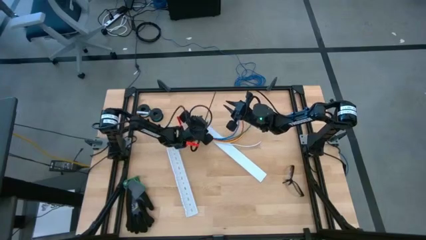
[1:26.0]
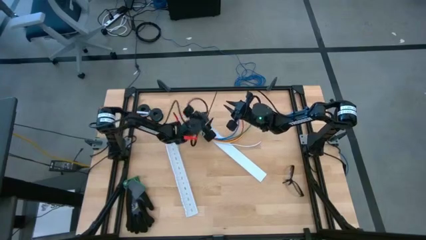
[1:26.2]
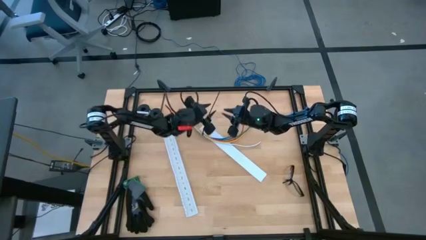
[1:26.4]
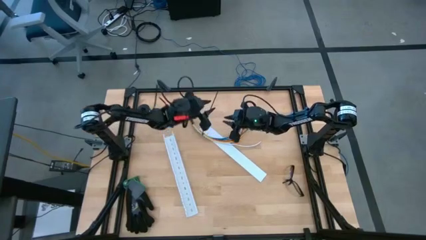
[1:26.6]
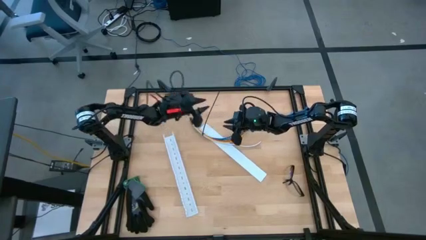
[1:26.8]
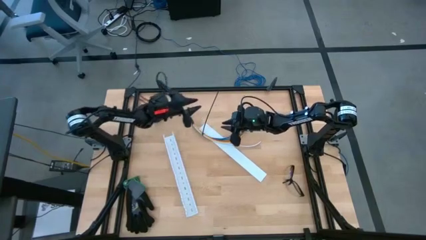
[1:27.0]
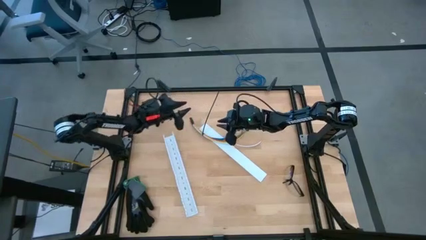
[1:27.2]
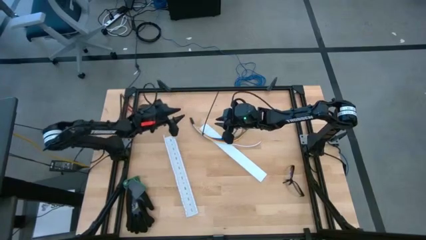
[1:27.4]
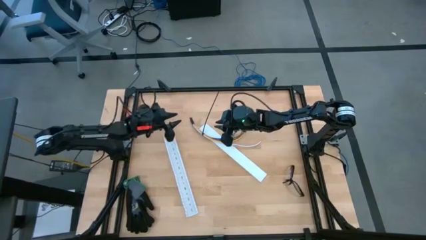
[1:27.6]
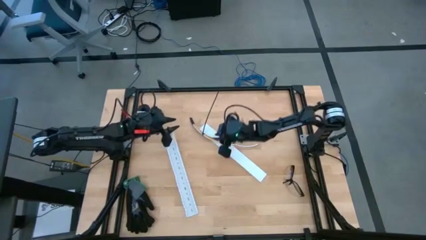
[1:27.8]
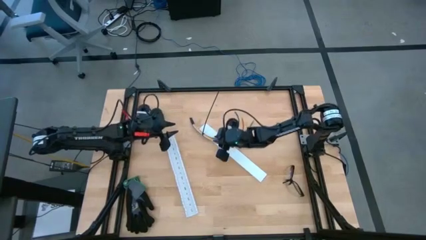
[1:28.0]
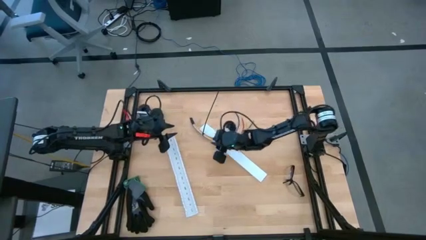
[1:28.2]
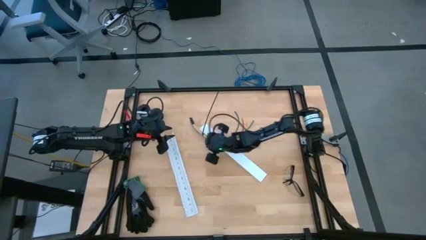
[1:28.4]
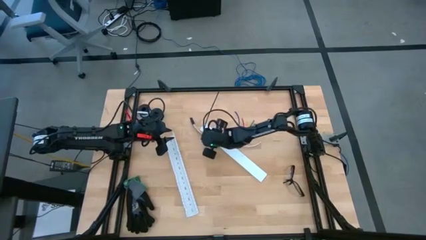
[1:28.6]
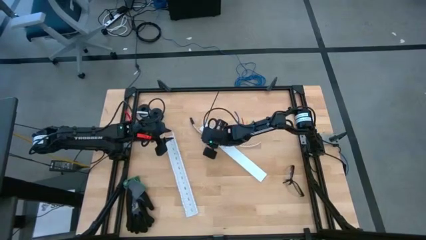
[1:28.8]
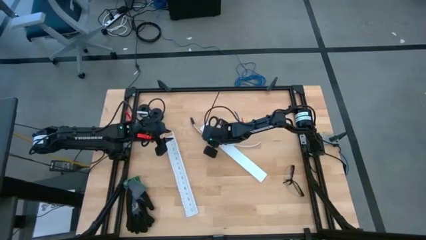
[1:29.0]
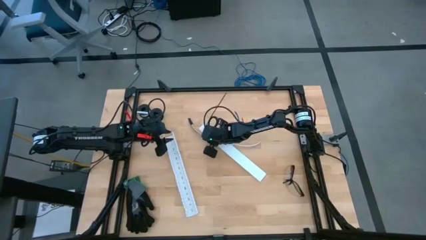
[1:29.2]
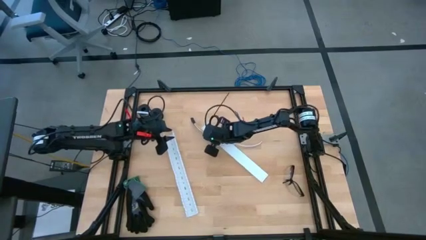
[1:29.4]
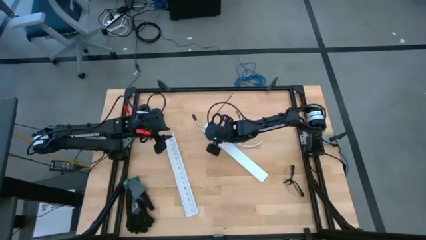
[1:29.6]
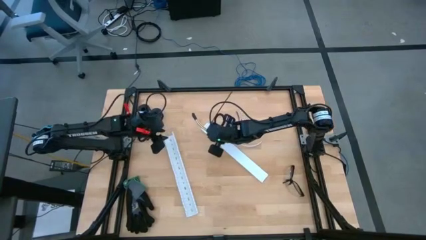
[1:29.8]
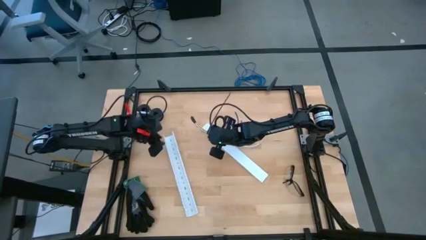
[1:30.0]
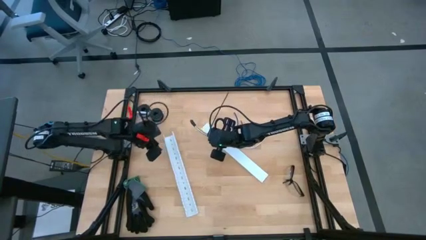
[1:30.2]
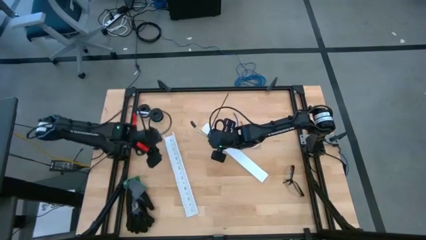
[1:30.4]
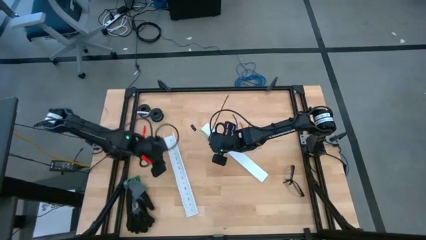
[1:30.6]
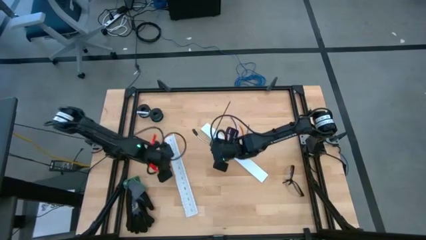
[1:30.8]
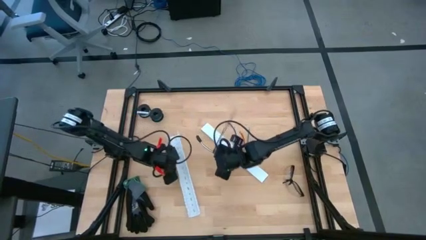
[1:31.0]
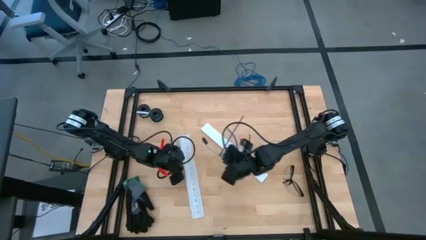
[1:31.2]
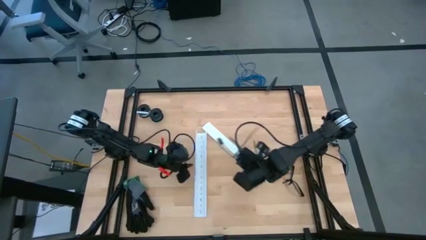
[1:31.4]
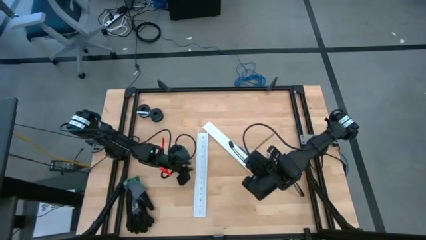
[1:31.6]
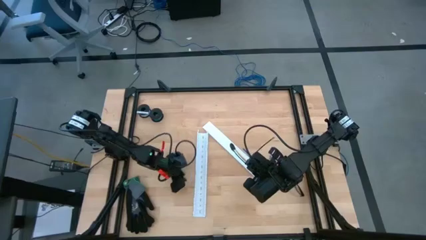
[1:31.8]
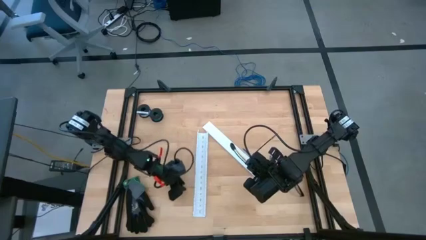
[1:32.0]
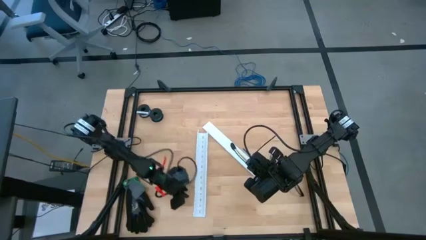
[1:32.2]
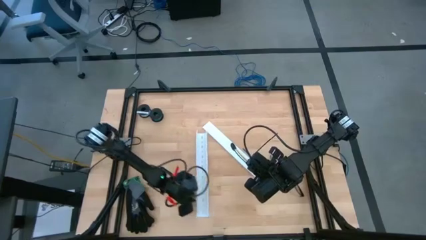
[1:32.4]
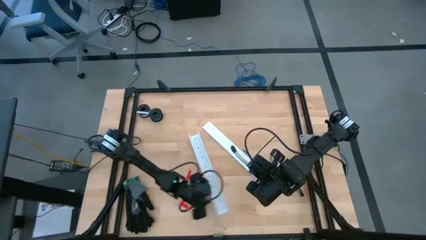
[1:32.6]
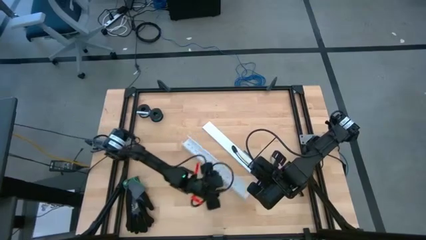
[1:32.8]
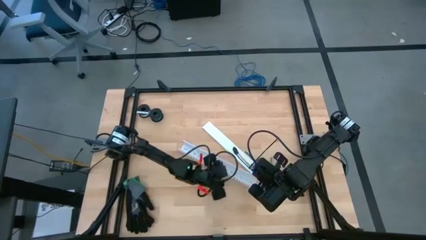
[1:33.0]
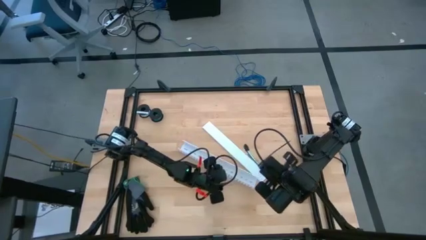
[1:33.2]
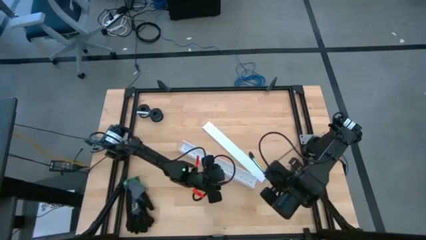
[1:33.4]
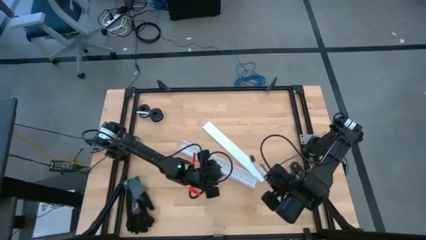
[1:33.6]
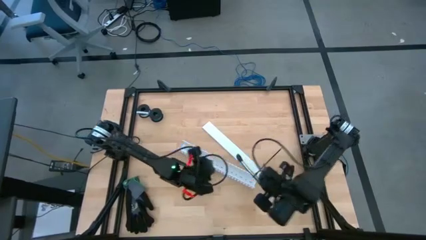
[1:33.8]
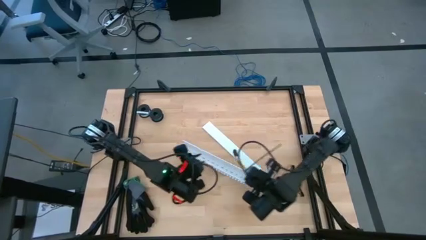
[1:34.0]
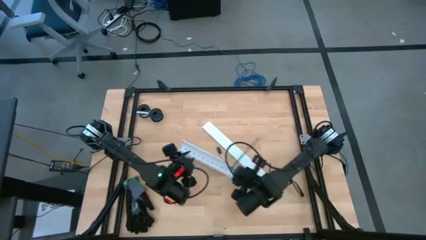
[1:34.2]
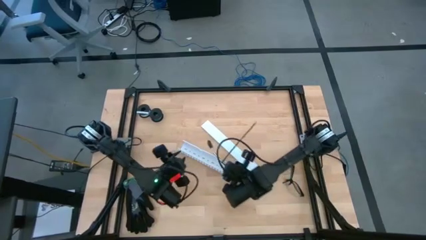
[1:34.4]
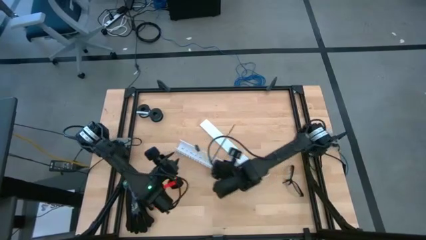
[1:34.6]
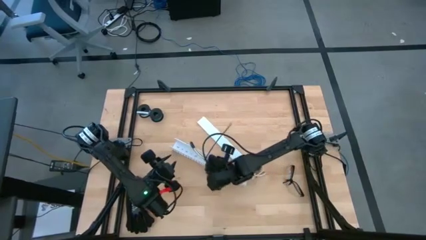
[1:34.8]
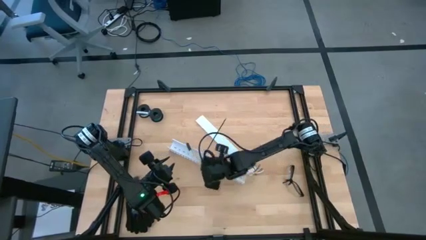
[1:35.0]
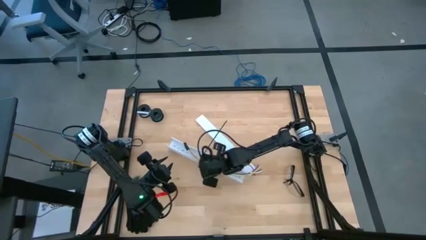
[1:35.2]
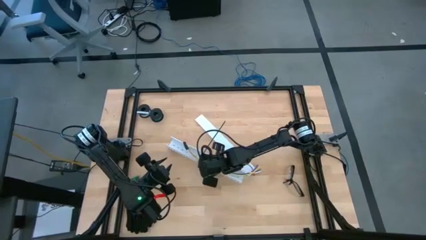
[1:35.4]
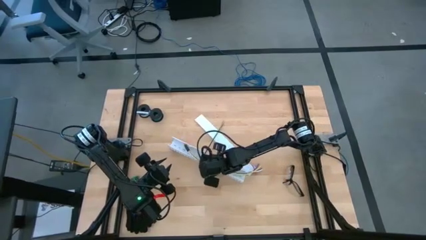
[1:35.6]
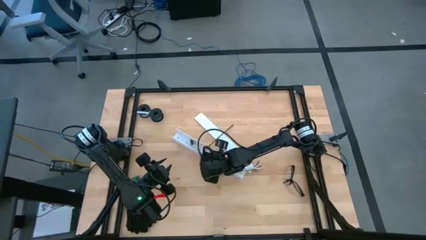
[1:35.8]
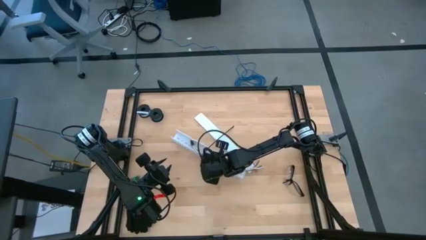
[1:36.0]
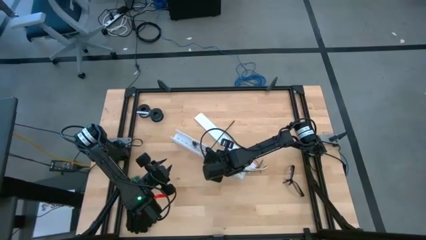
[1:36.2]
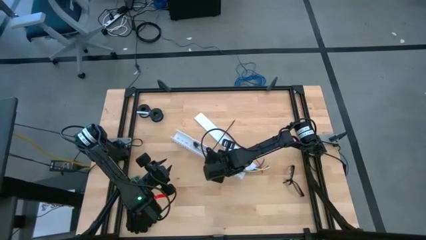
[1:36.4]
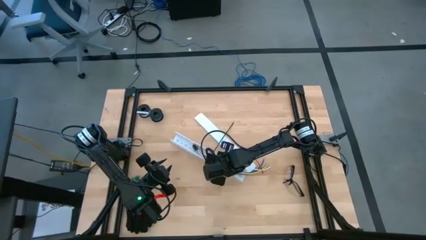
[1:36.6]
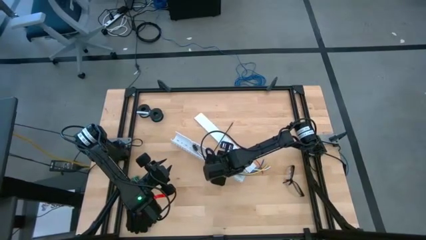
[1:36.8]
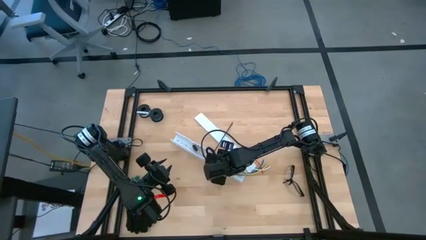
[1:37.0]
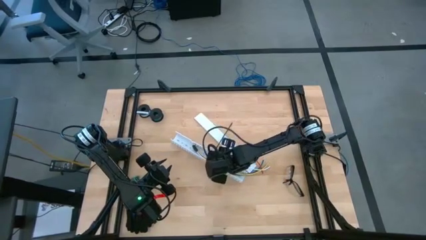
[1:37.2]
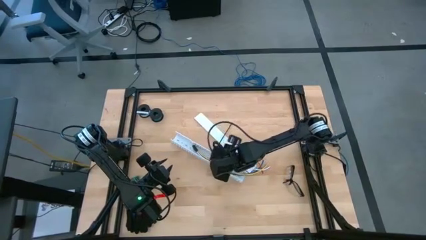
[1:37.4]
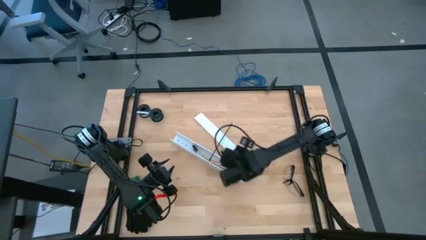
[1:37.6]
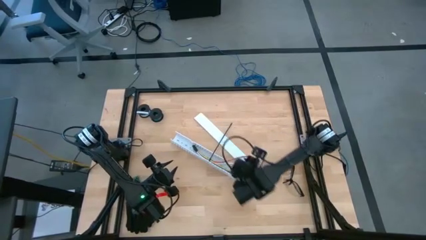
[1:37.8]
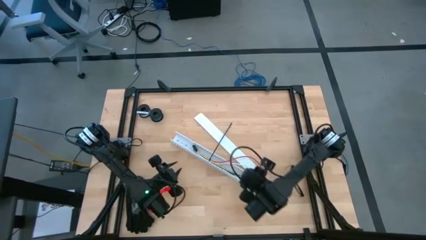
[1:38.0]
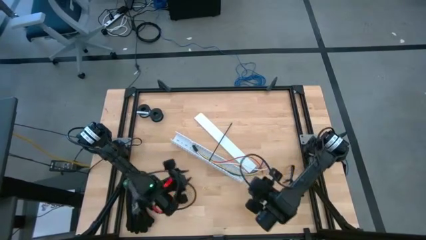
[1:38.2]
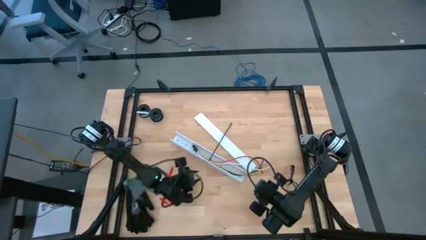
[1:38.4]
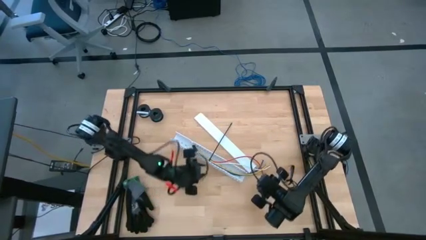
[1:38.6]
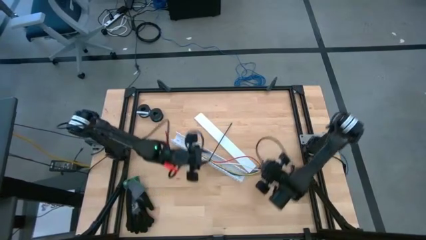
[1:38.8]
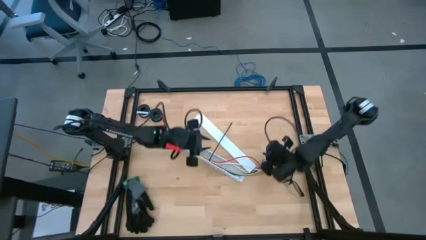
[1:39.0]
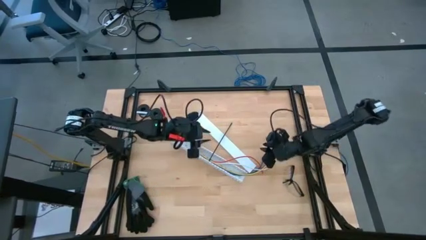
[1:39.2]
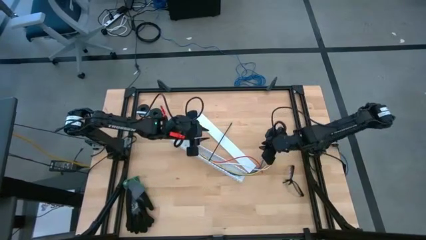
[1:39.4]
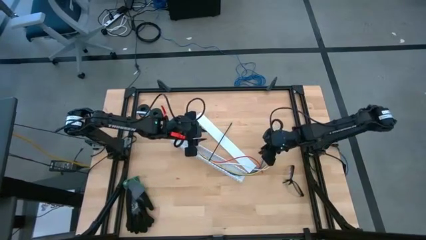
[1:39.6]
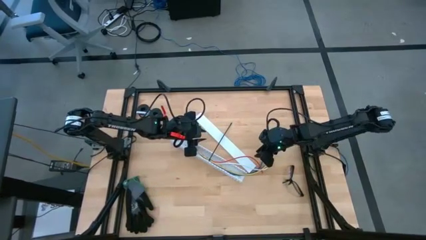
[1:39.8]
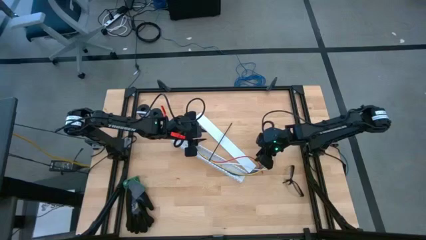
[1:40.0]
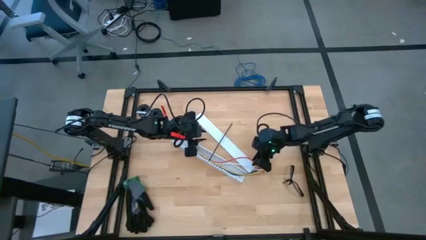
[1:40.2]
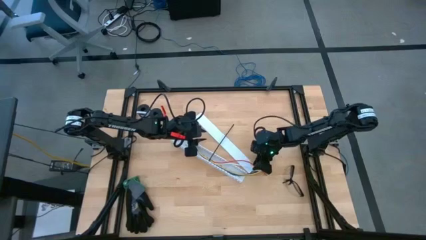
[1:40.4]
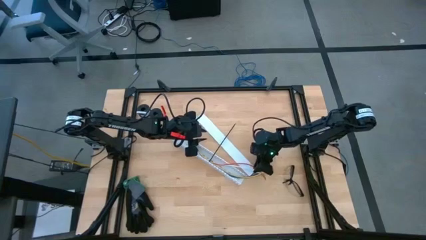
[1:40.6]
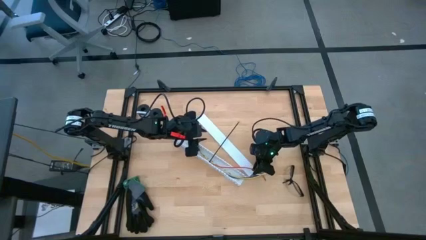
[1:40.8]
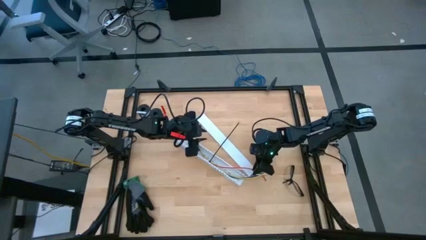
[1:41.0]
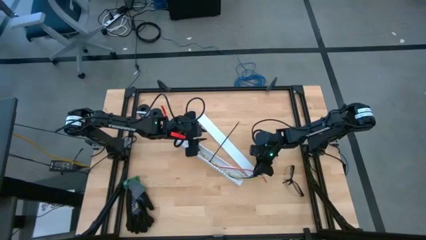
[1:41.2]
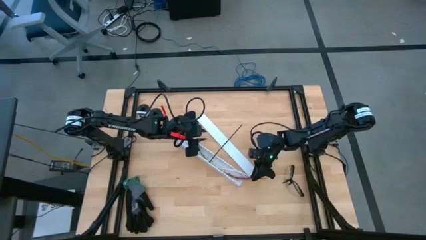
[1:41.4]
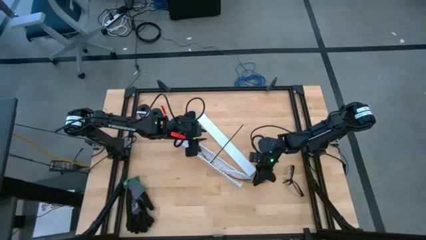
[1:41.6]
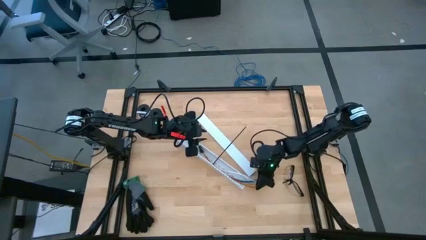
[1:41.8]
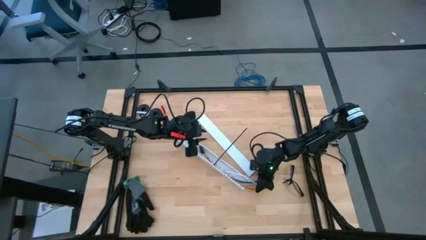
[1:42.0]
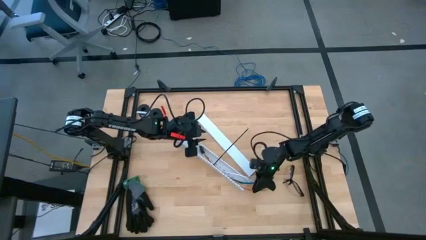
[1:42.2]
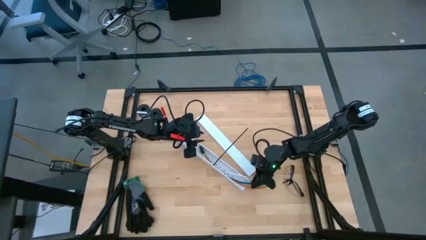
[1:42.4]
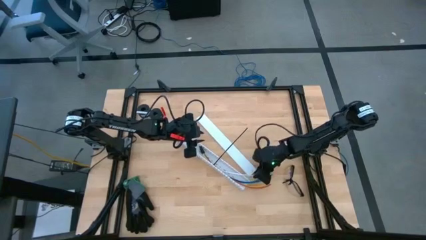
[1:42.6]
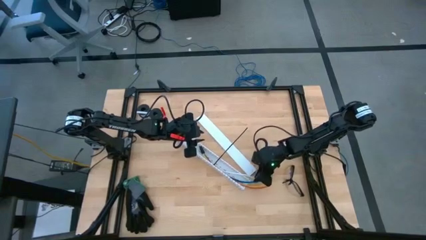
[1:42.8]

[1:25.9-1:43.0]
Task: Ziptie cables
Put the zip-tied cables into the white cable duct
